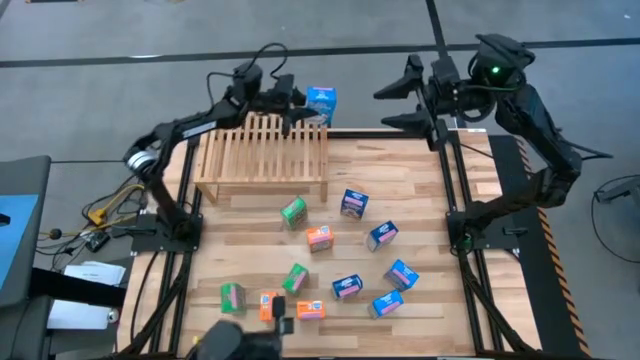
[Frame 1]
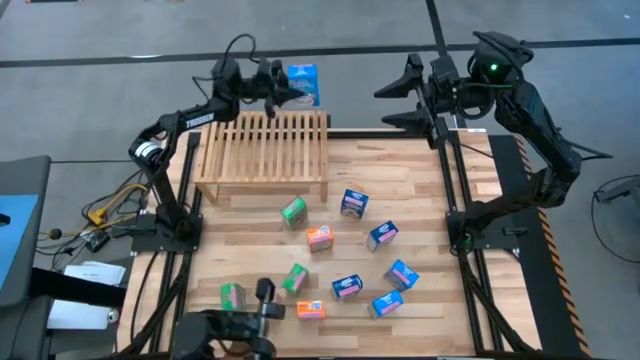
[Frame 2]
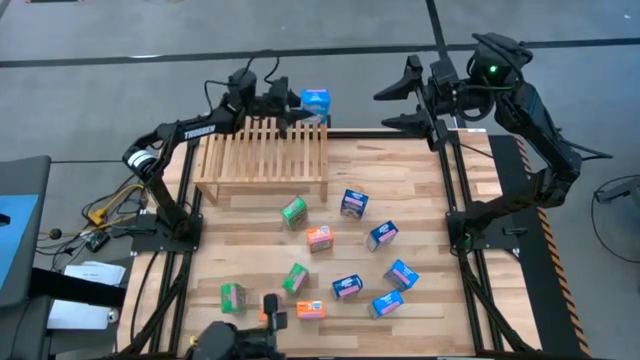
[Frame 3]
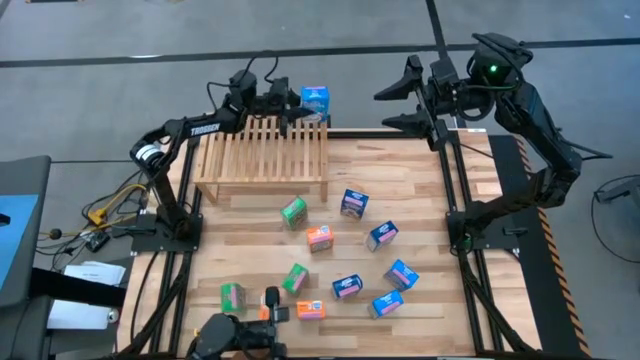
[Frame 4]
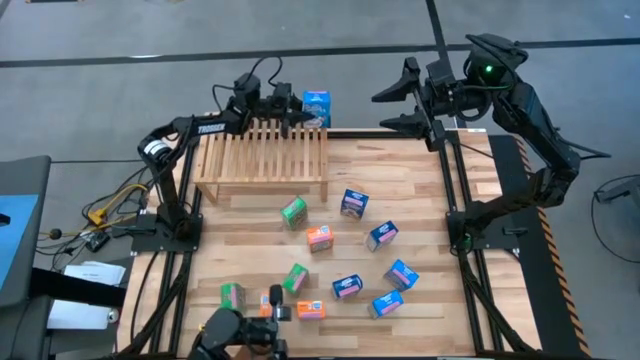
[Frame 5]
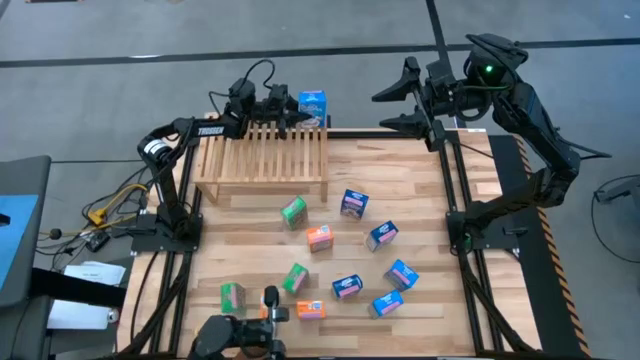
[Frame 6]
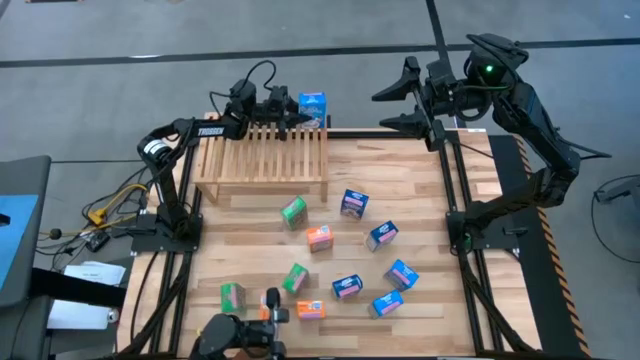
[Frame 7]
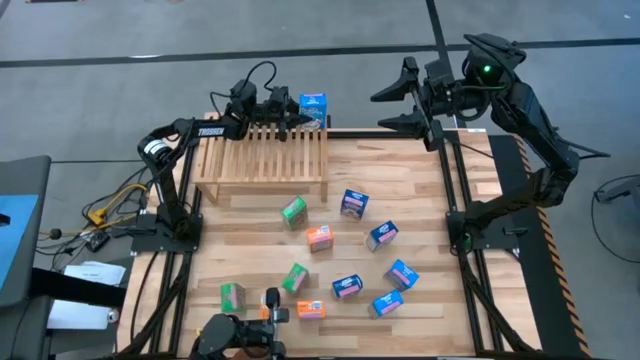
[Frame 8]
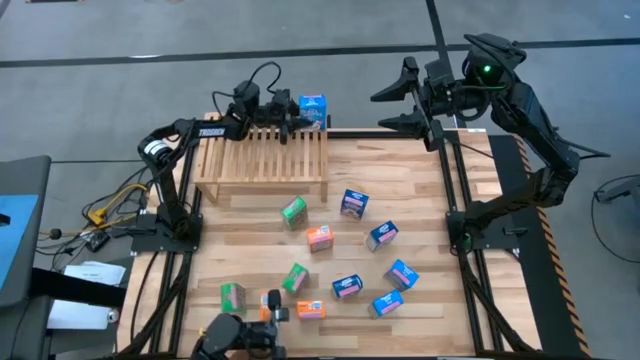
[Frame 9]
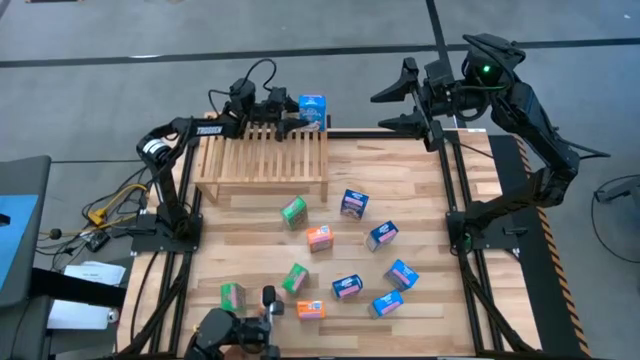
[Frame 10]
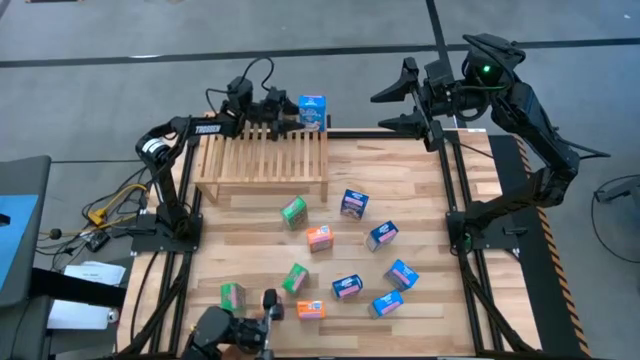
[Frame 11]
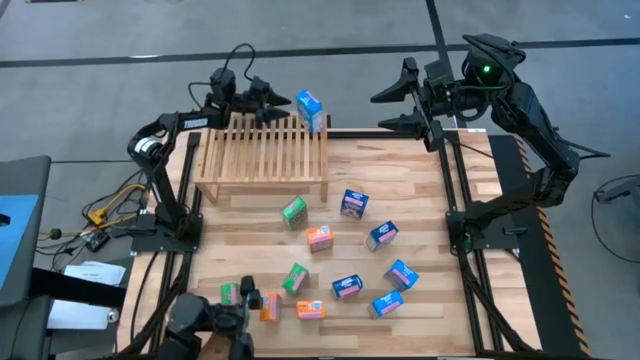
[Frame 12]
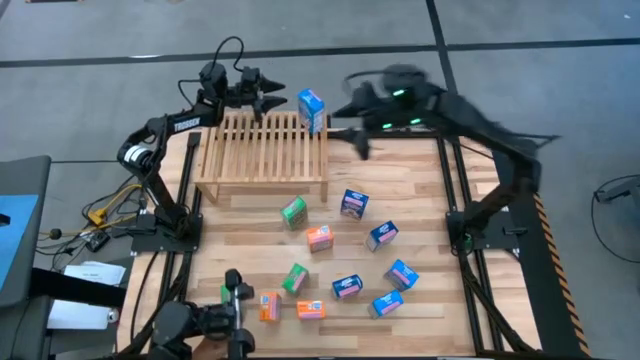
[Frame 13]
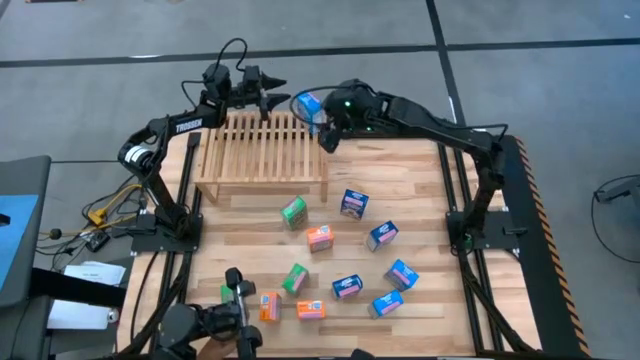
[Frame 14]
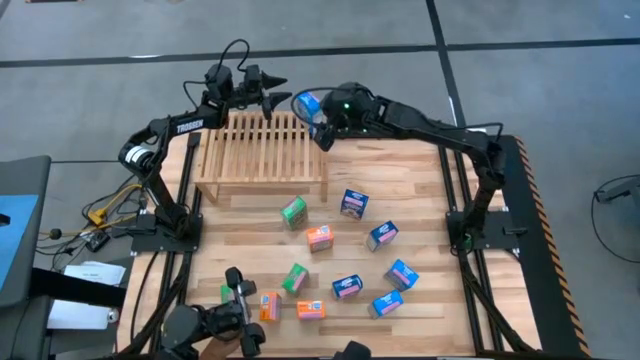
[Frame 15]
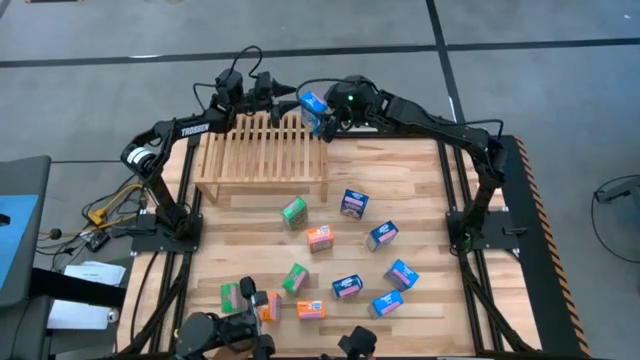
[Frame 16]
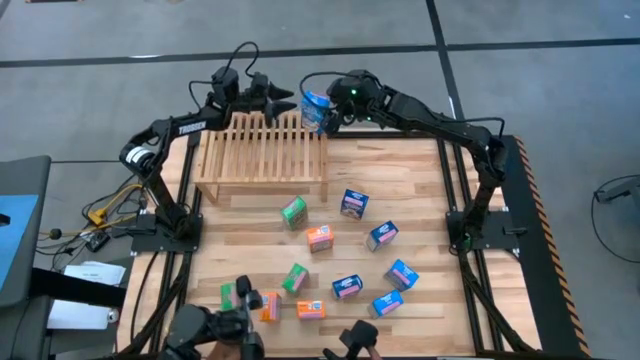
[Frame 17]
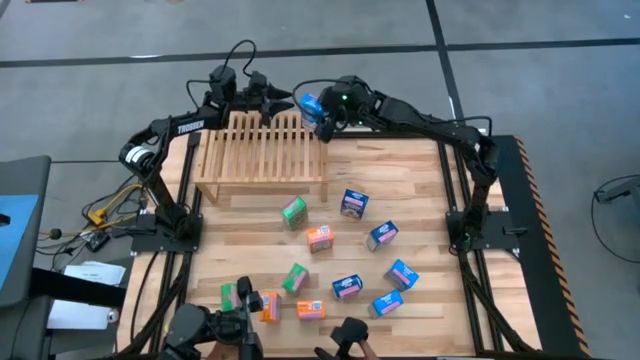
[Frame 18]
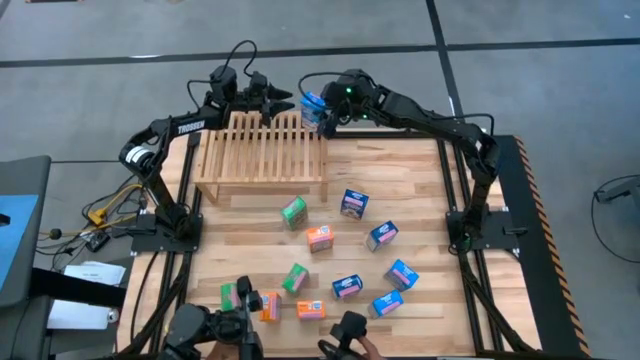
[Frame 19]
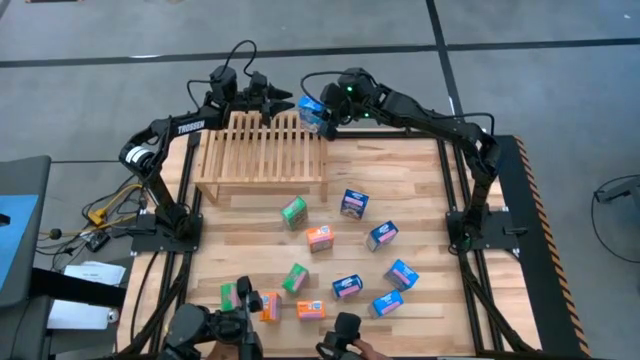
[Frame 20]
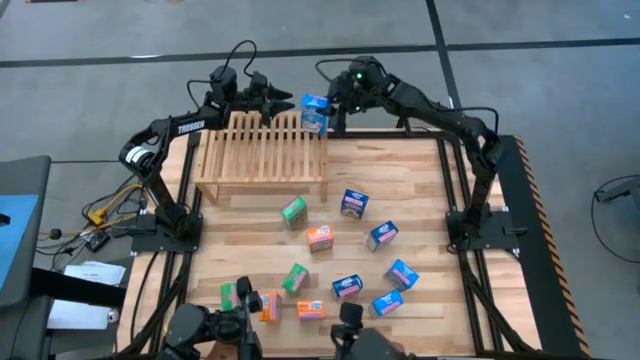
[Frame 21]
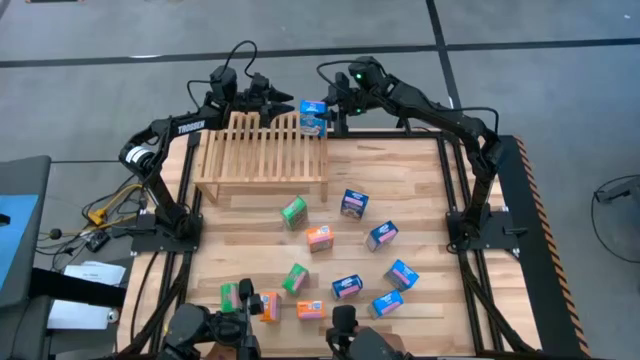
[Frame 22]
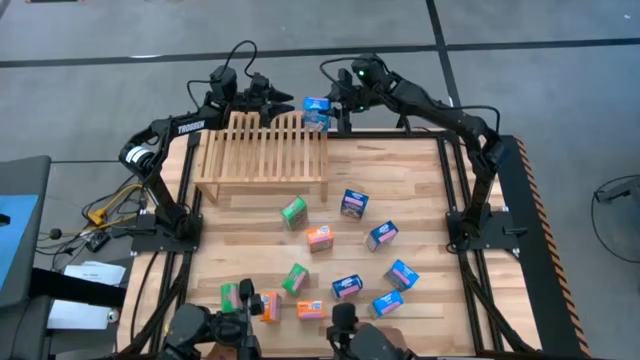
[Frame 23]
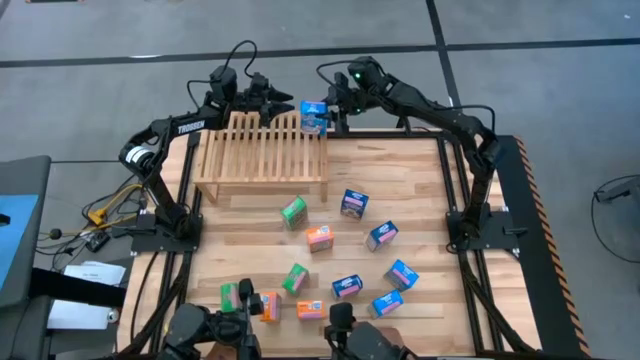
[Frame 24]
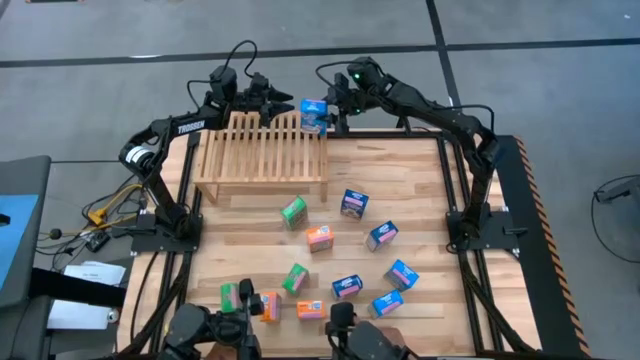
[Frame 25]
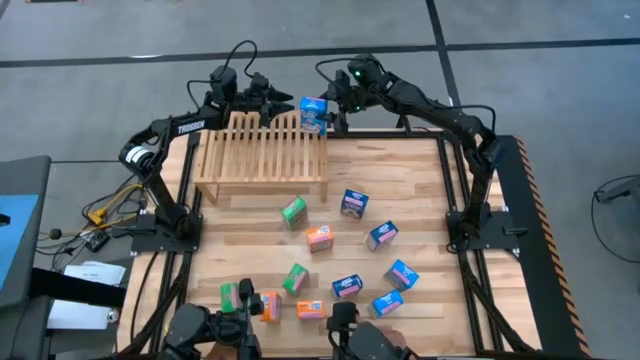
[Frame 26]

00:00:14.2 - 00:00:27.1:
Task: Stack cereal on shelf
Put the top light blue cereal box on the shelf

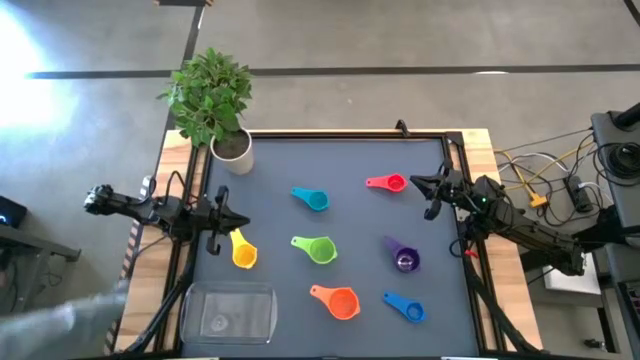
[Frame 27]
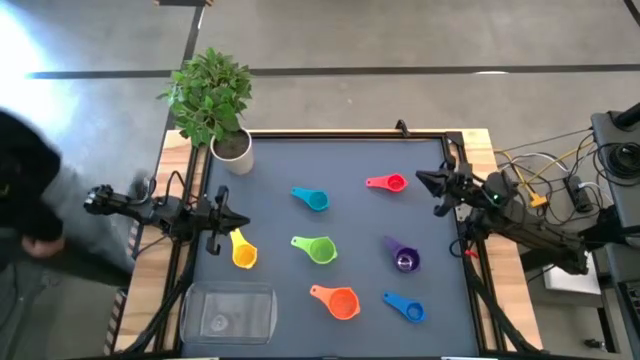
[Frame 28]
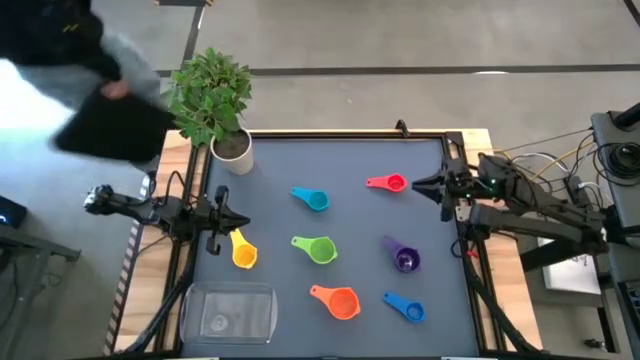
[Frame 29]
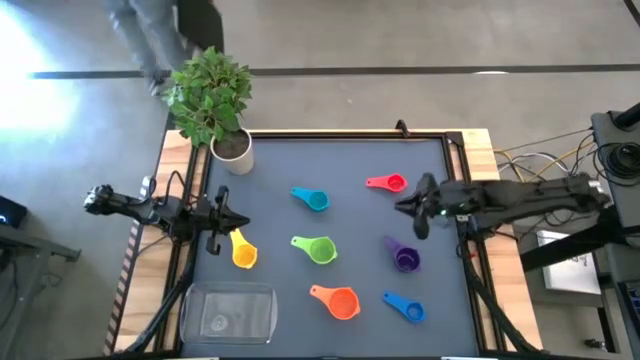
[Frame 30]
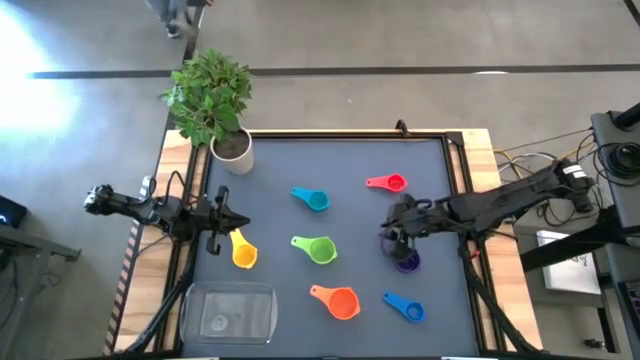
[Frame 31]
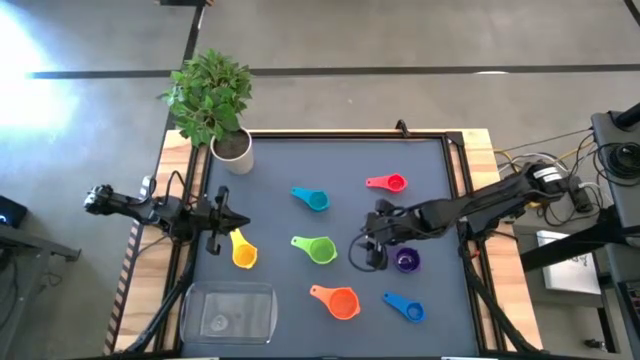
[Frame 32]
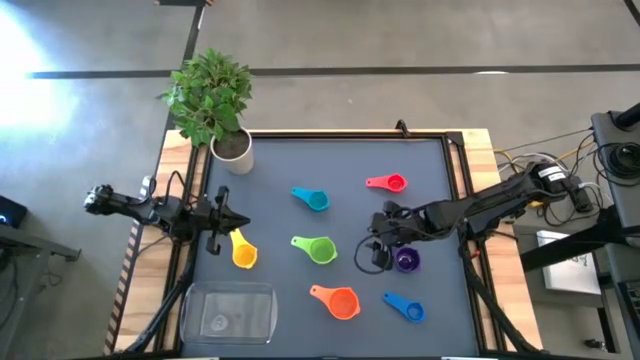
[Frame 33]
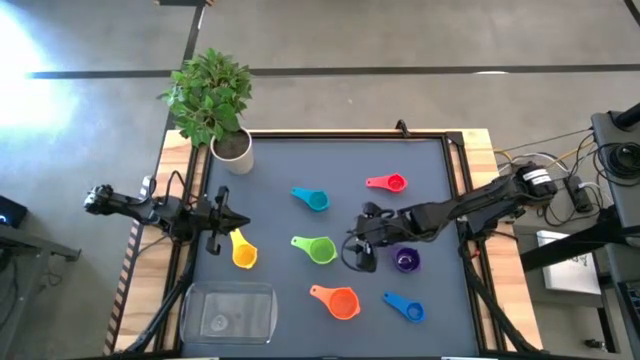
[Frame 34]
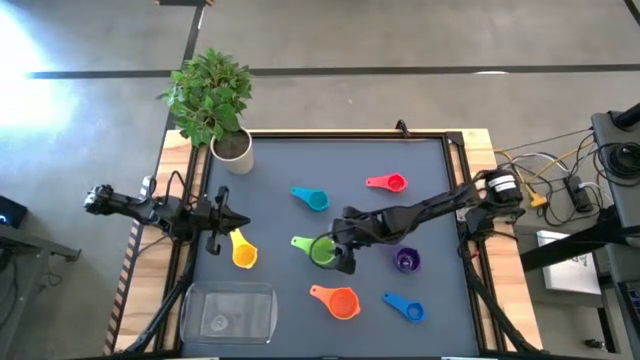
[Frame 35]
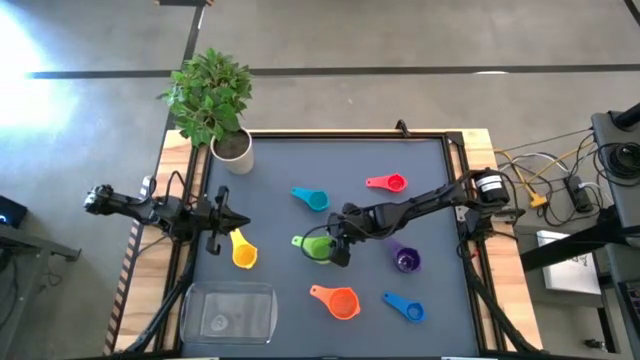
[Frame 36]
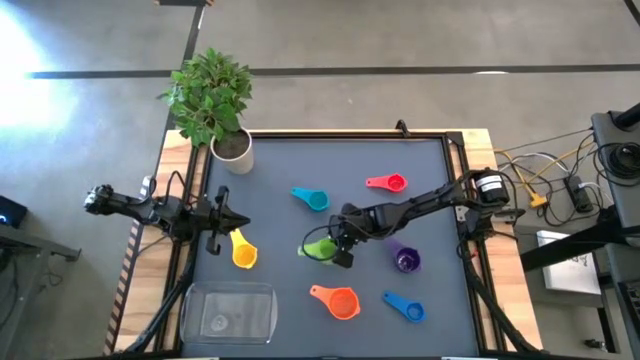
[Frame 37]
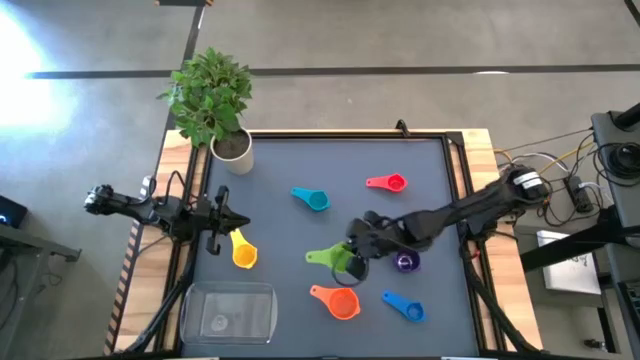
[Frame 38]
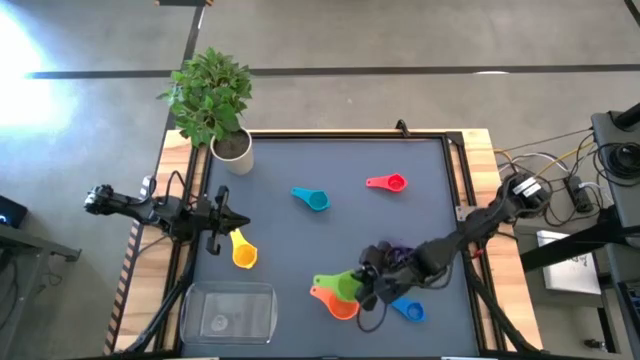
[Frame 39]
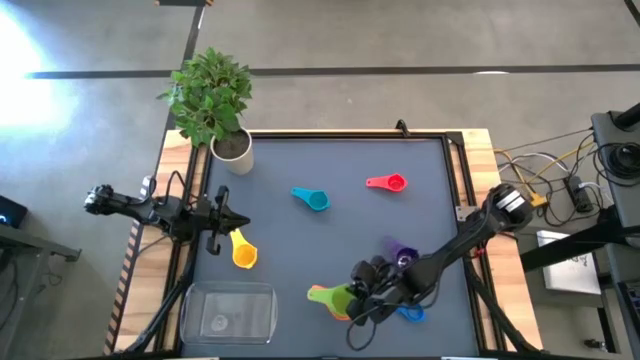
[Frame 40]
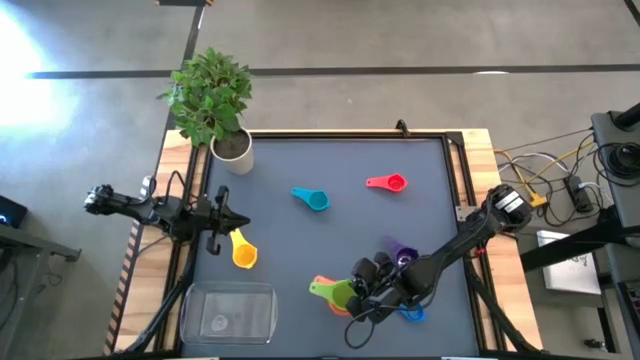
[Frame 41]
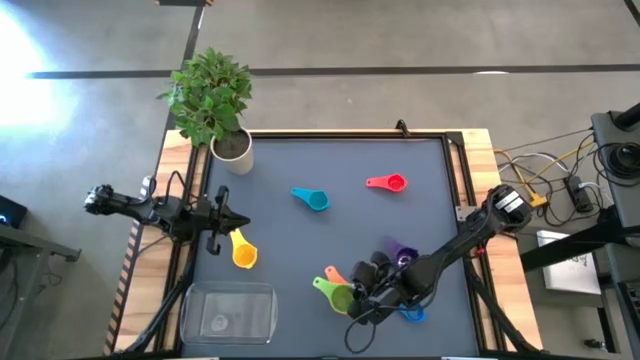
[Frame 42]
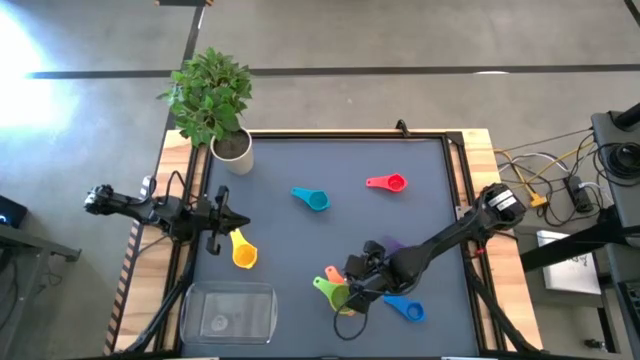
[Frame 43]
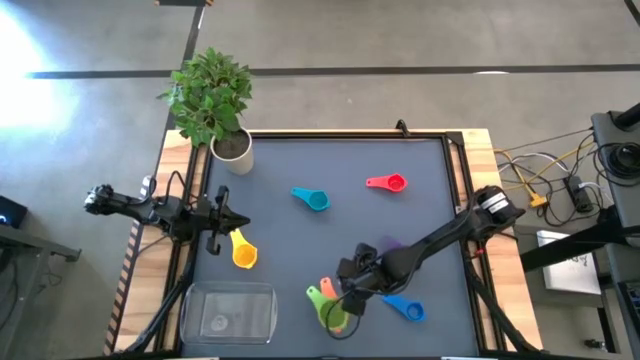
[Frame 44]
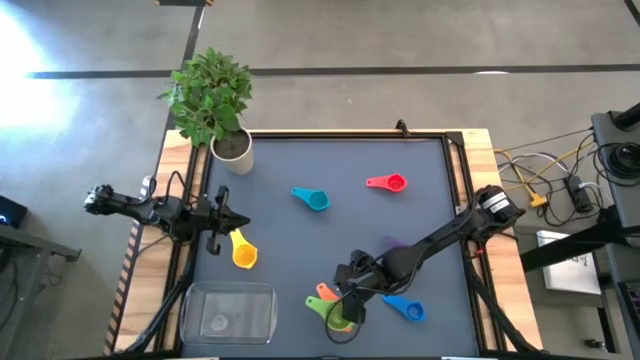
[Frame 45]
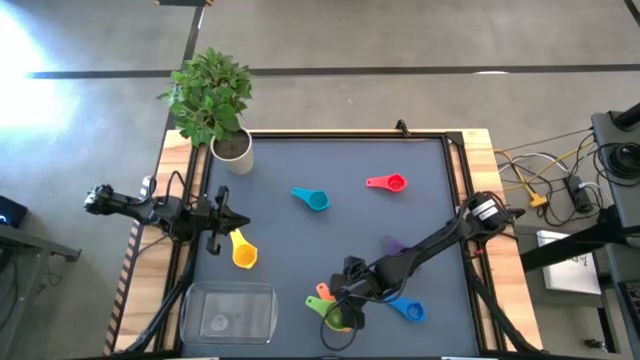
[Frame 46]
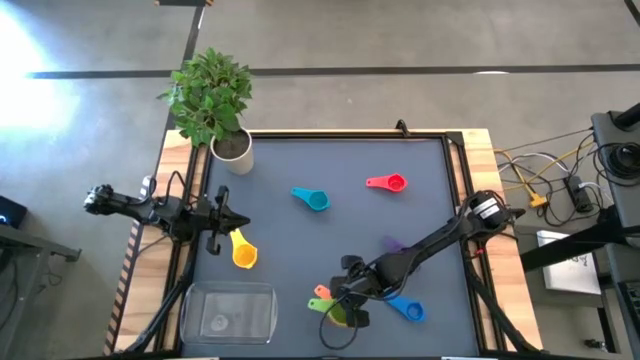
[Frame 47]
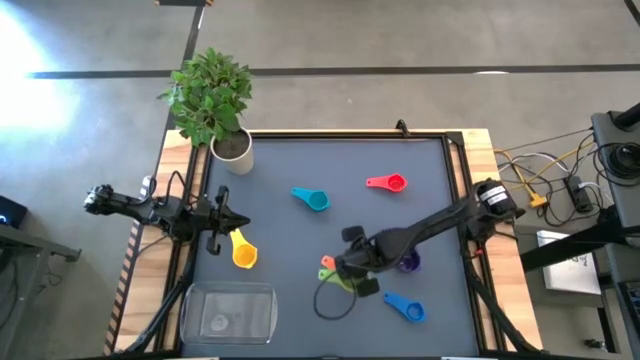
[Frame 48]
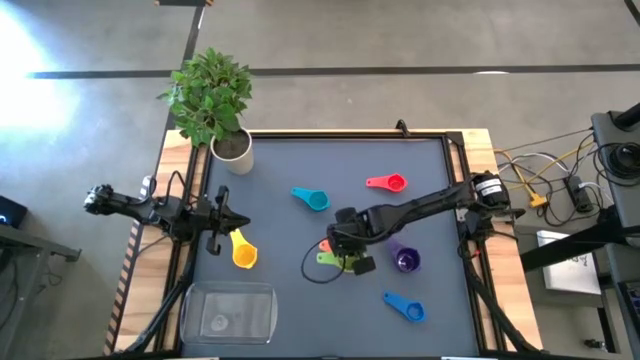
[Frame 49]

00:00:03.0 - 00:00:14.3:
Task: Nest measuring cups in basket
Stack the green measuring cup into the orange measuring cup
